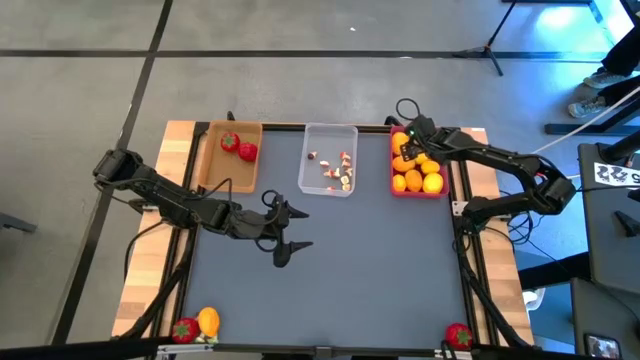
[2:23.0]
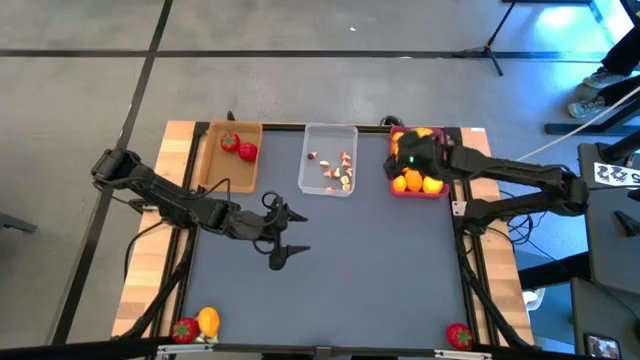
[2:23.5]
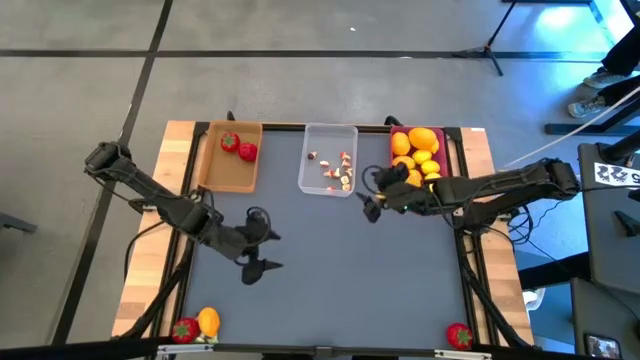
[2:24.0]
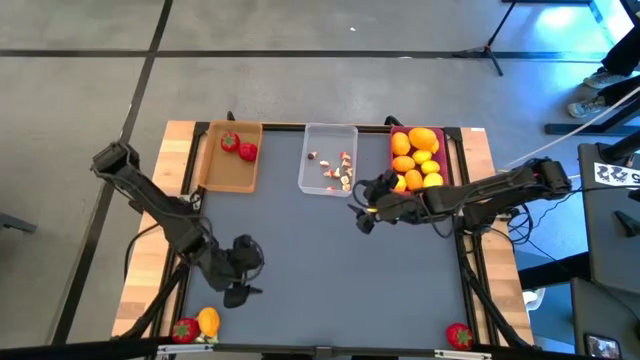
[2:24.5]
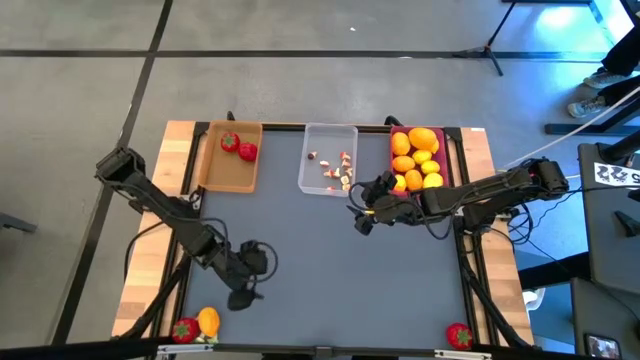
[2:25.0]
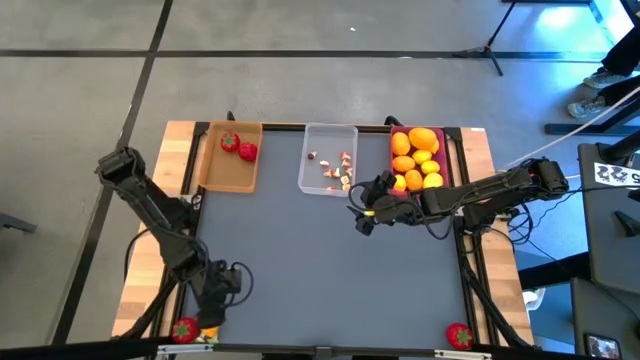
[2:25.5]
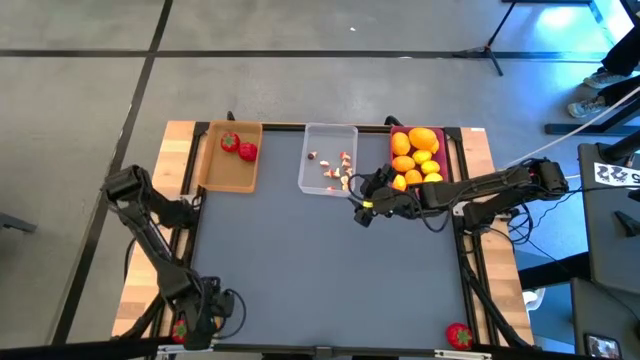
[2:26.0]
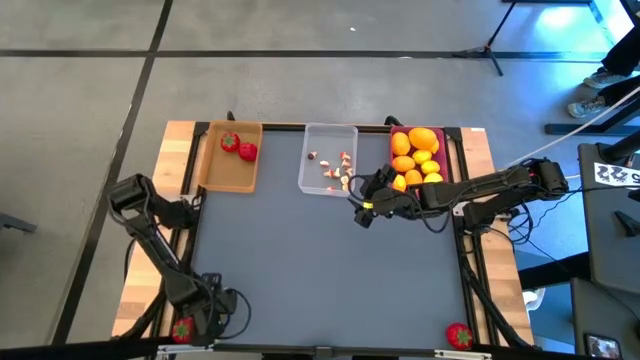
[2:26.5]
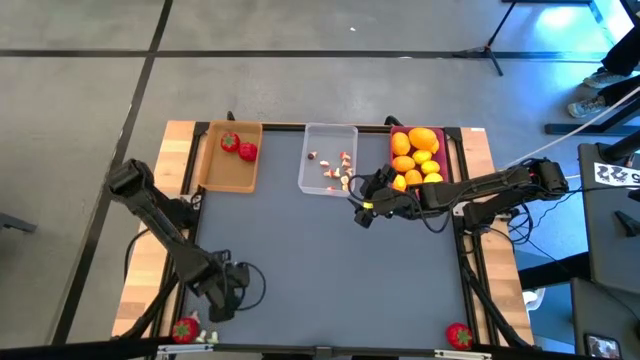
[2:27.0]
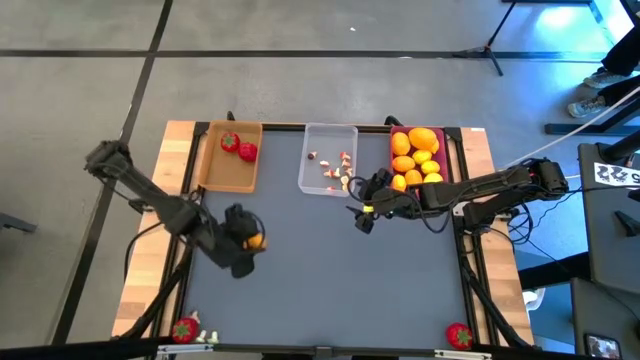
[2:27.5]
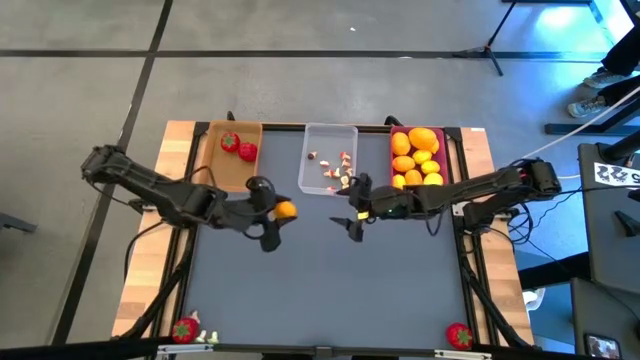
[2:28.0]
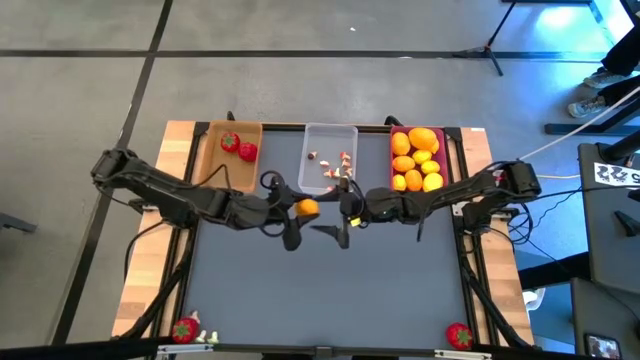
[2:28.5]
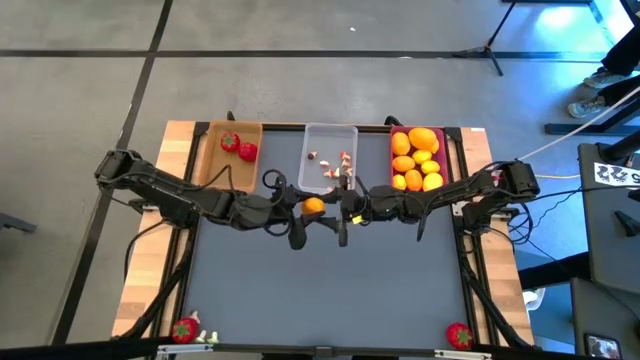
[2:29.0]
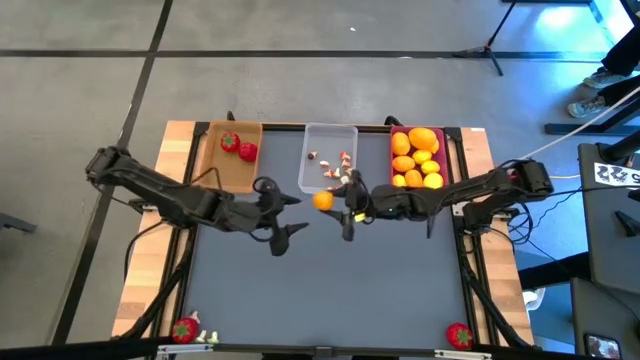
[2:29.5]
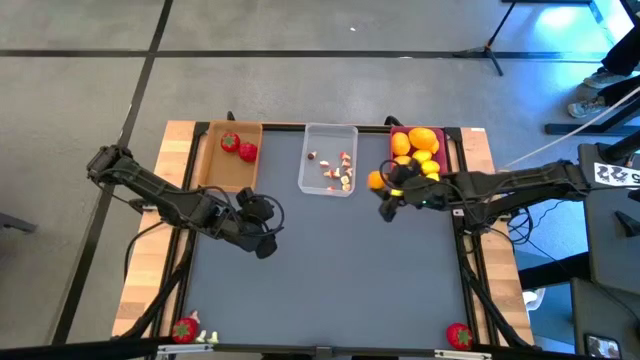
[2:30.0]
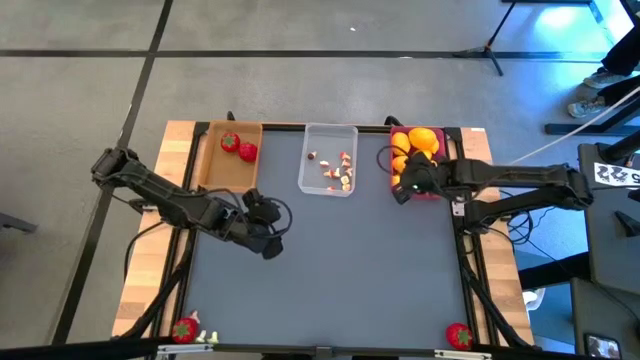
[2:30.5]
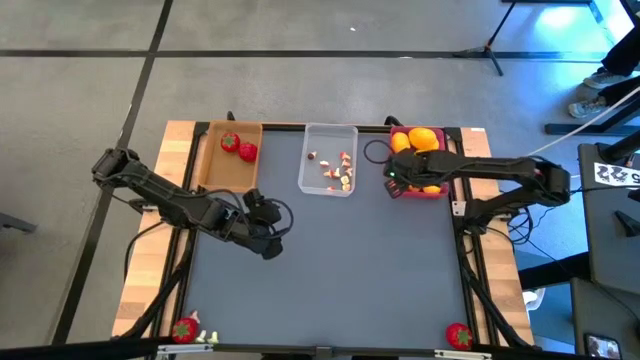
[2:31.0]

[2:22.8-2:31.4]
Task: Sort produce into baskets
Put the lemon into the pink bin

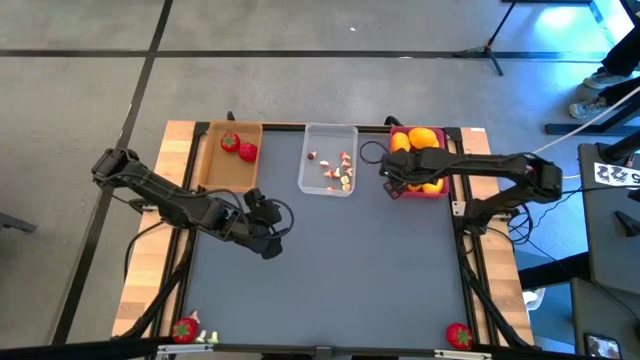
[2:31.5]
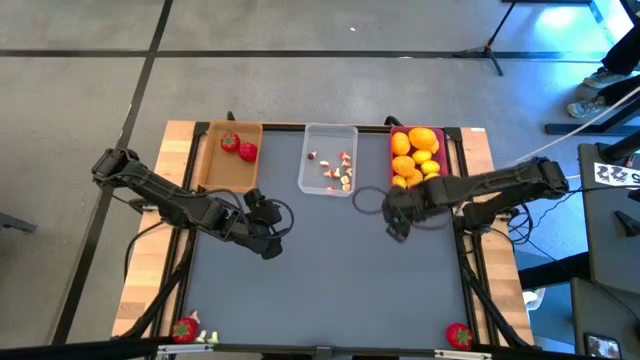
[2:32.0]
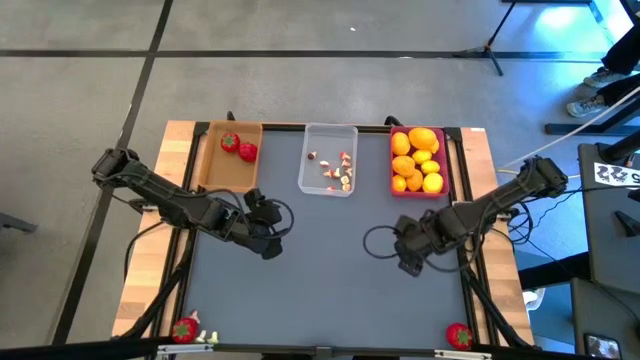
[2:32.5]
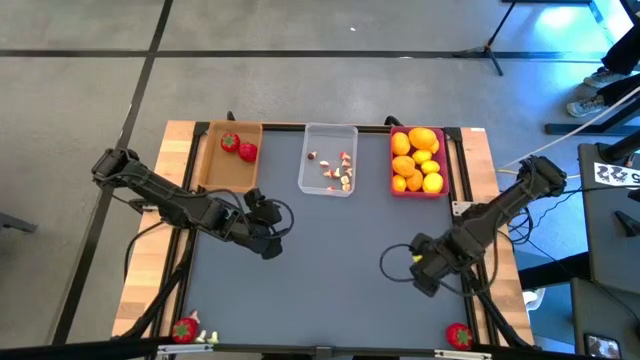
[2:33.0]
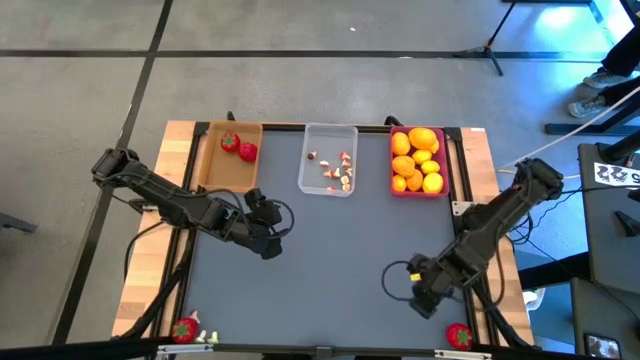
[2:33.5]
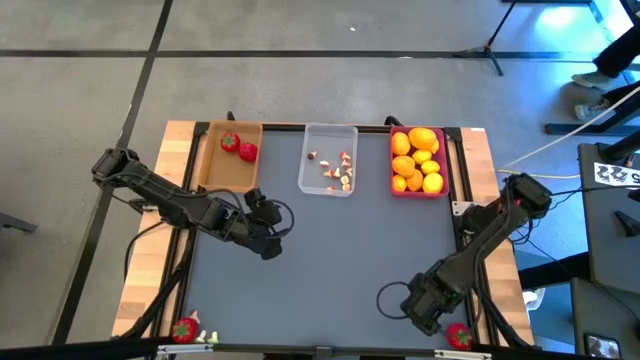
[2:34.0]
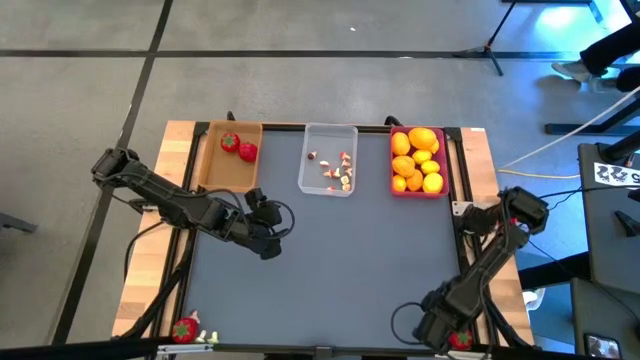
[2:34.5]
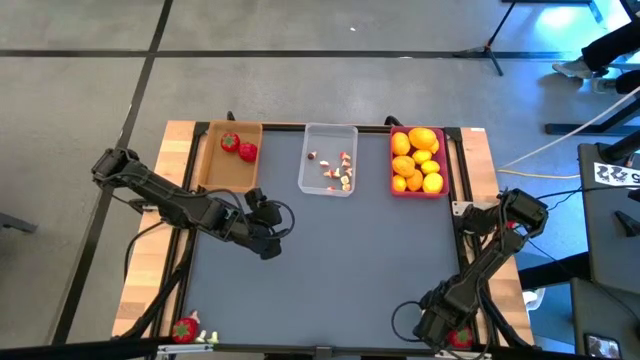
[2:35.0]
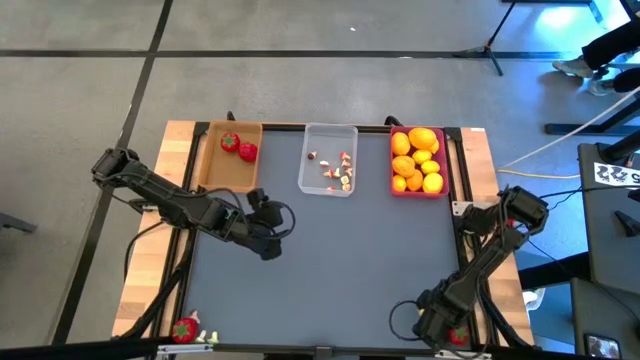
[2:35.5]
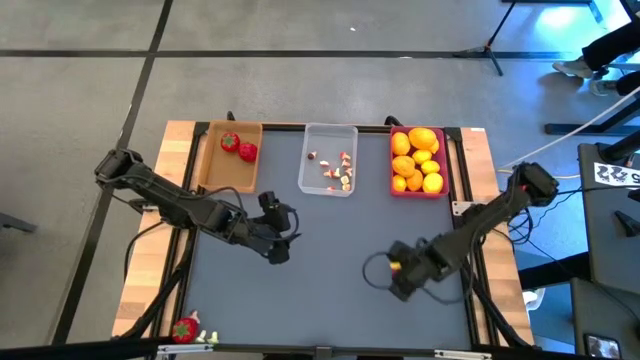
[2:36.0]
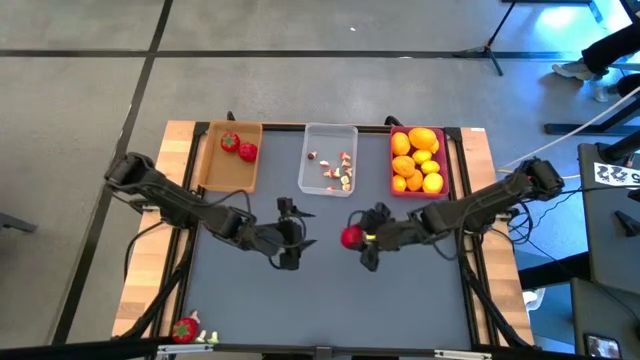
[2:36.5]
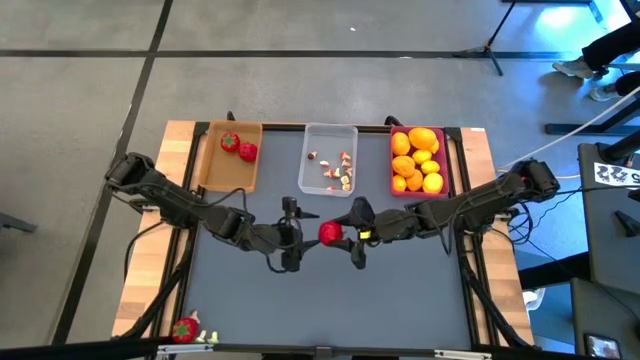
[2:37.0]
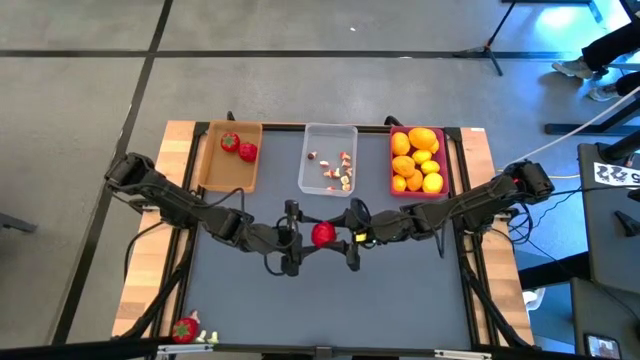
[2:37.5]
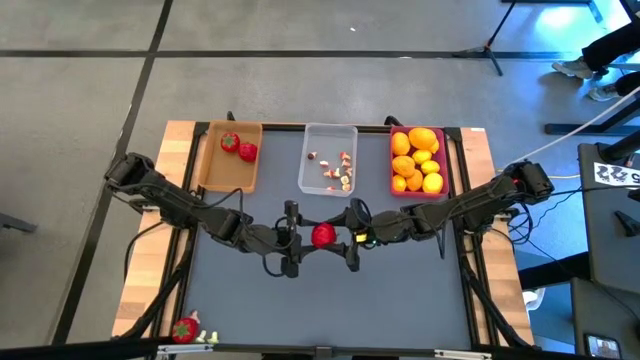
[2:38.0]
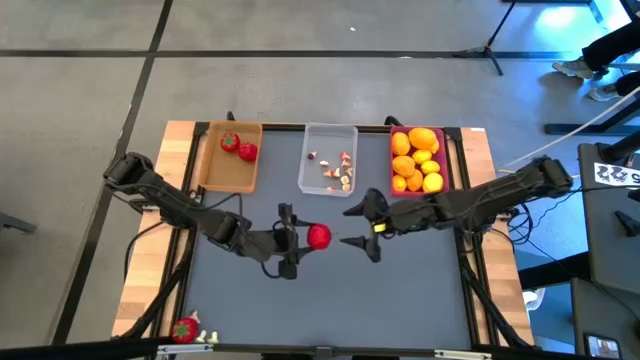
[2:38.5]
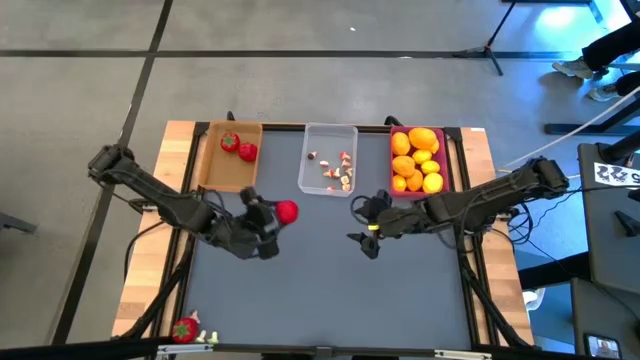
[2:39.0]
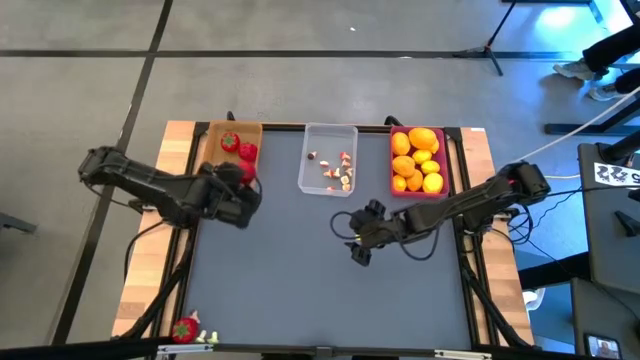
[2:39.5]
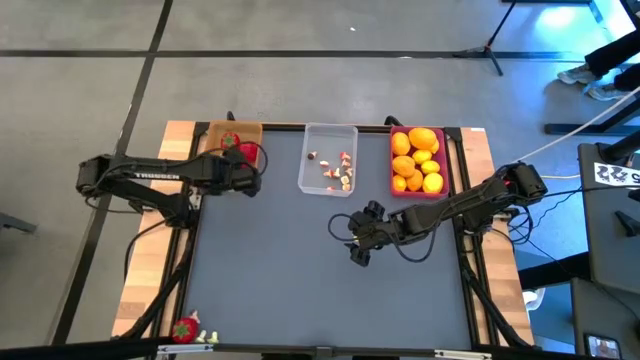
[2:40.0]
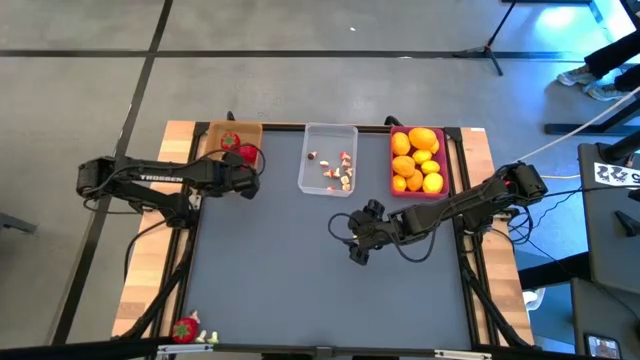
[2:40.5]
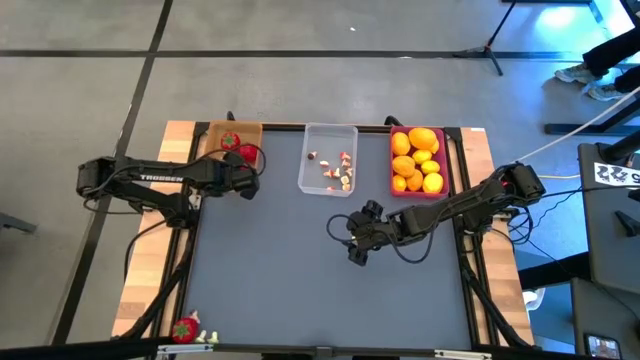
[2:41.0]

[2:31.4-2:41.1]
Put the tomato into the orange bin

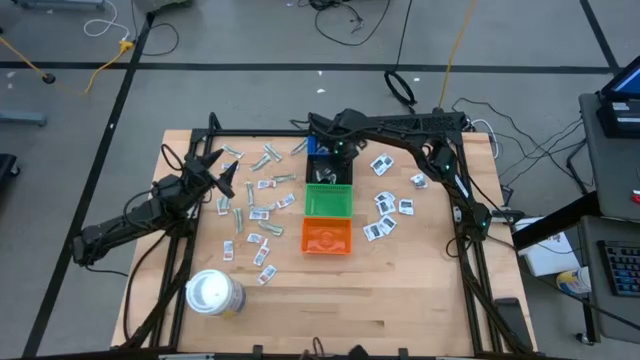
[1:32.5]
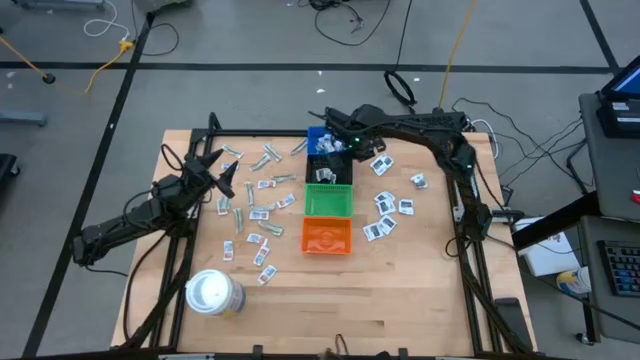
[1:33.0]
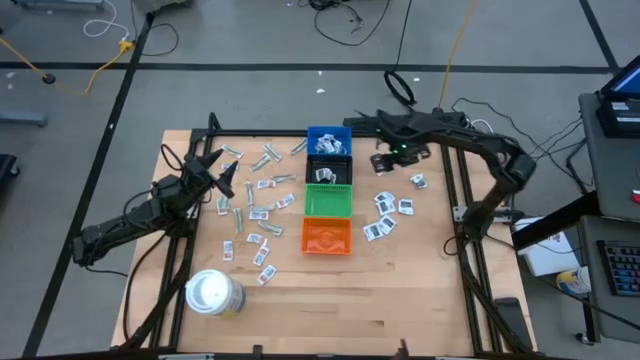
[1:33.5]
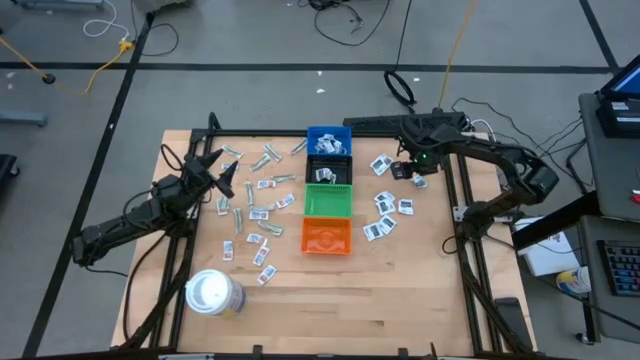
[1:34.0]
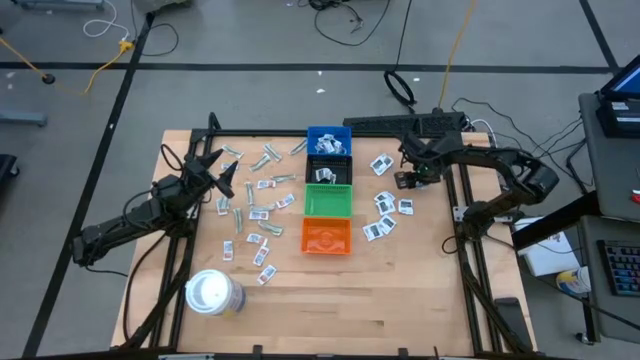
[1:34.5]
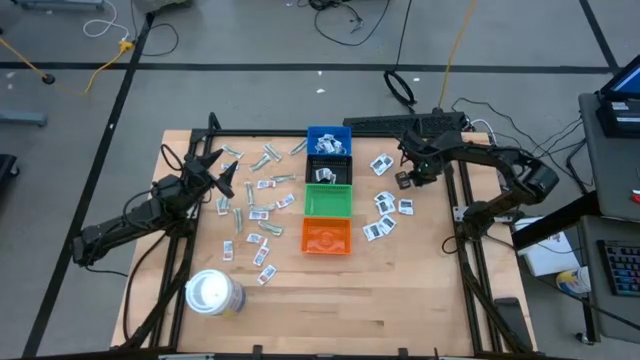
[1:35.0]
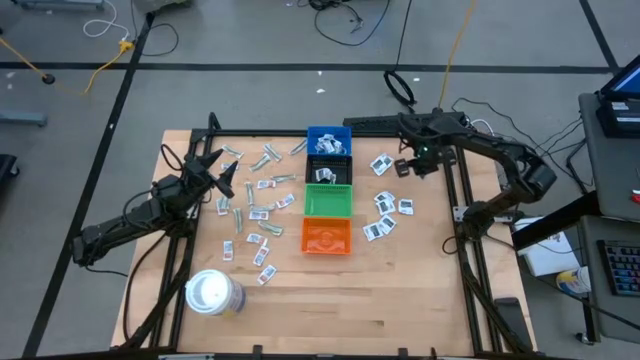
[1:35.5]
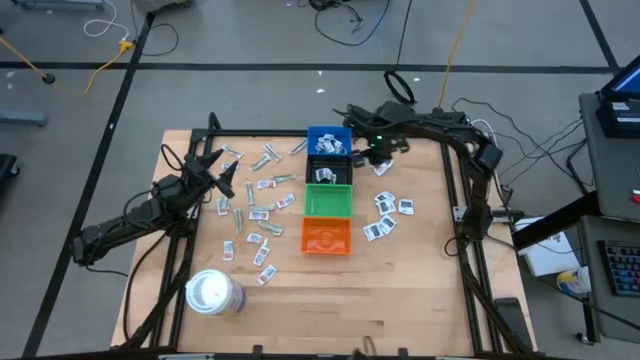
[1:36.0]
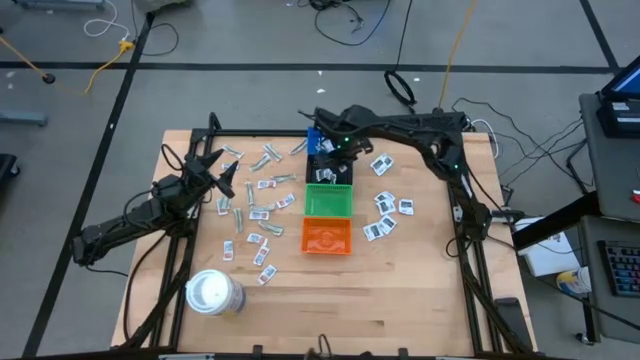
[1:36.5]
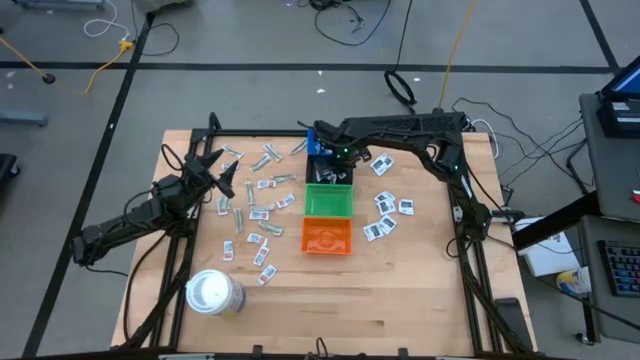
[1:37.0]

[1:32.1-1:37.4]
Task: Pick & Place First Aid Supplies
Put the black towelette pack into the black bin
